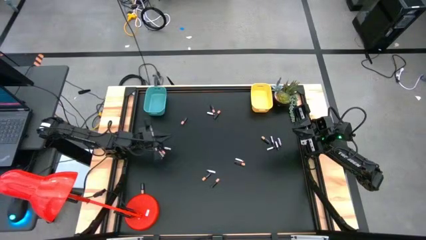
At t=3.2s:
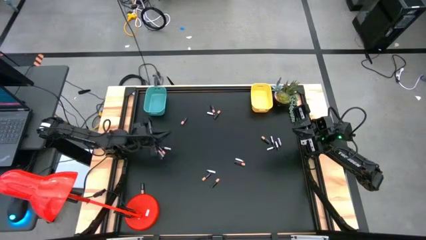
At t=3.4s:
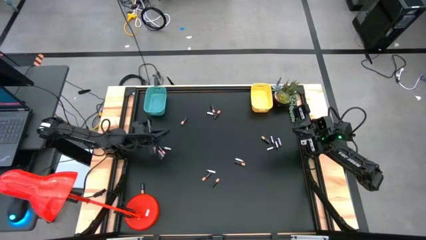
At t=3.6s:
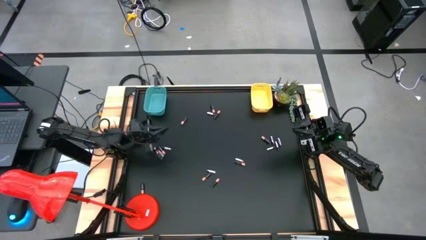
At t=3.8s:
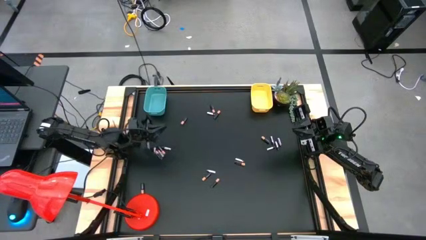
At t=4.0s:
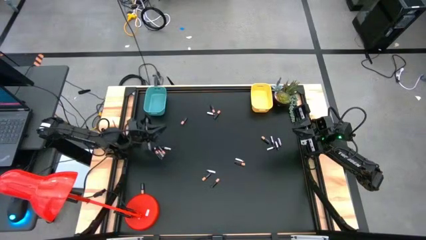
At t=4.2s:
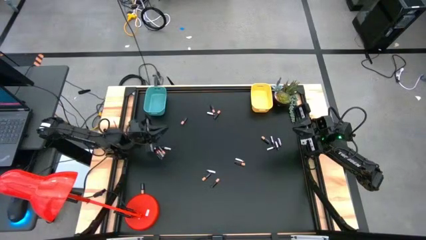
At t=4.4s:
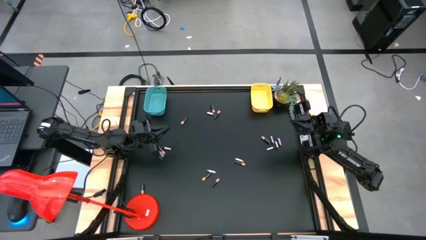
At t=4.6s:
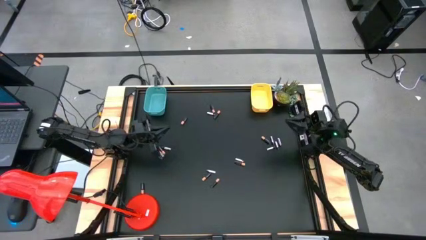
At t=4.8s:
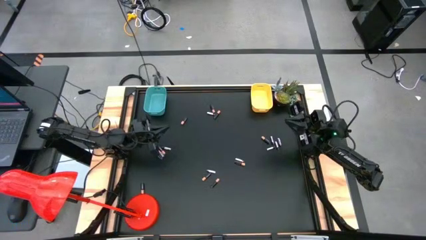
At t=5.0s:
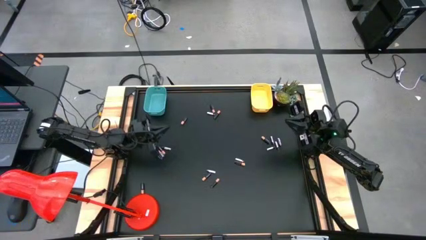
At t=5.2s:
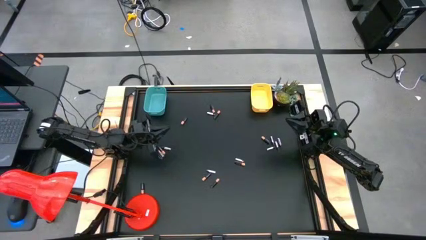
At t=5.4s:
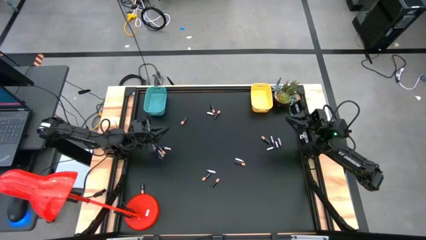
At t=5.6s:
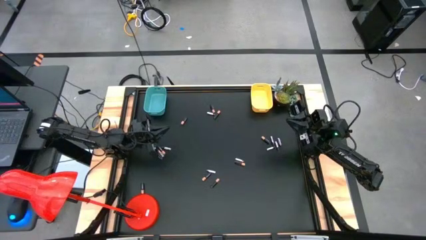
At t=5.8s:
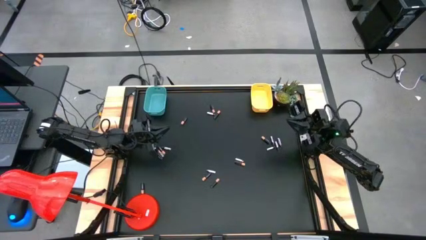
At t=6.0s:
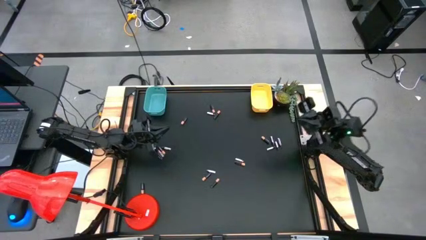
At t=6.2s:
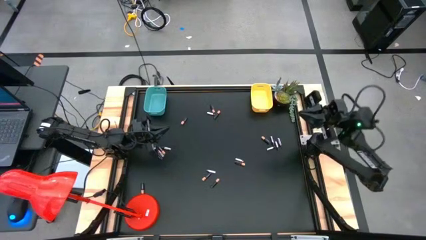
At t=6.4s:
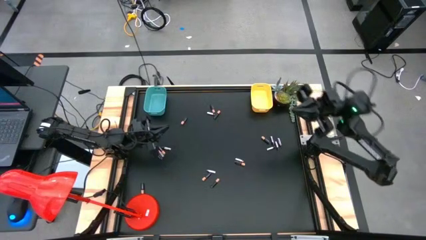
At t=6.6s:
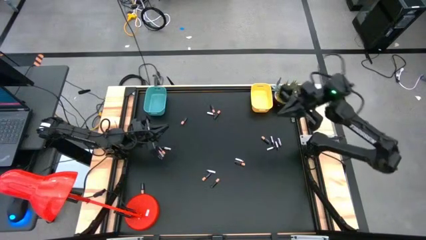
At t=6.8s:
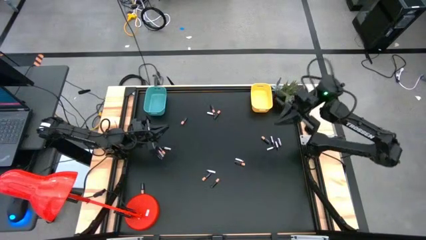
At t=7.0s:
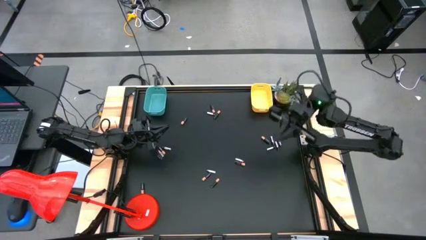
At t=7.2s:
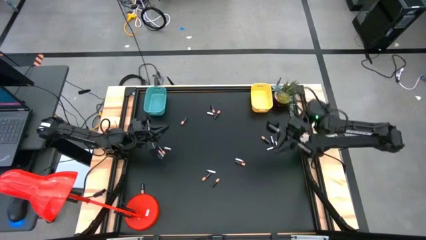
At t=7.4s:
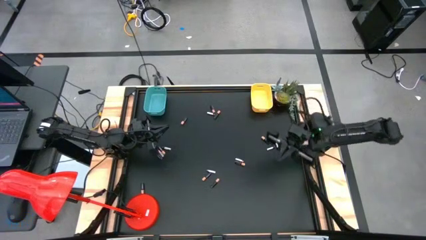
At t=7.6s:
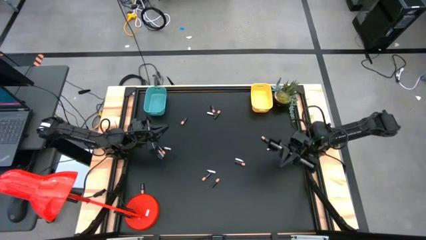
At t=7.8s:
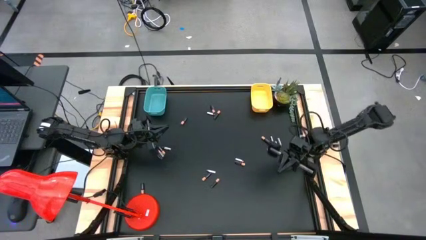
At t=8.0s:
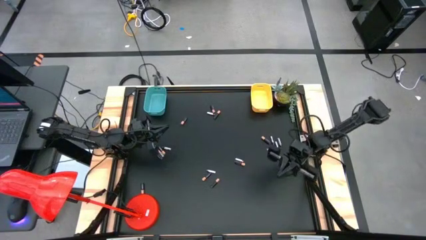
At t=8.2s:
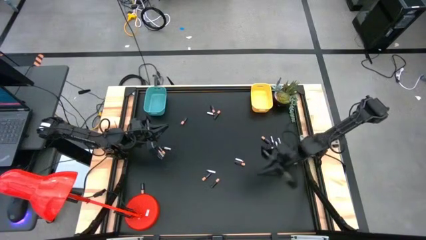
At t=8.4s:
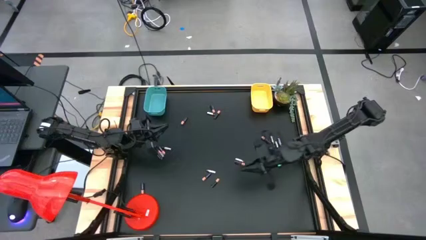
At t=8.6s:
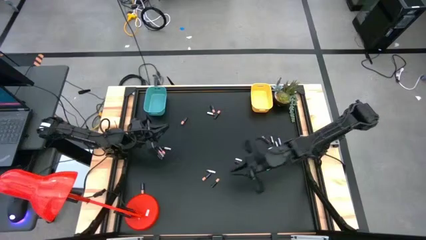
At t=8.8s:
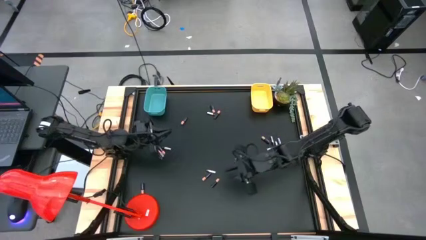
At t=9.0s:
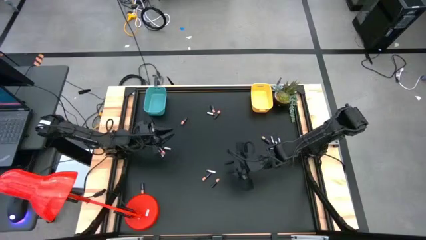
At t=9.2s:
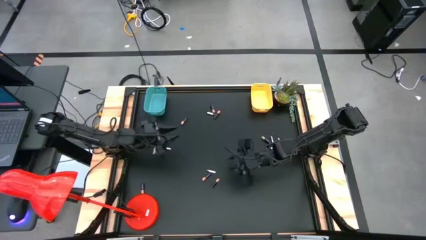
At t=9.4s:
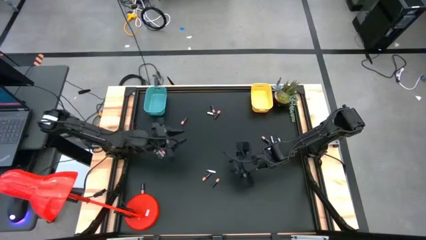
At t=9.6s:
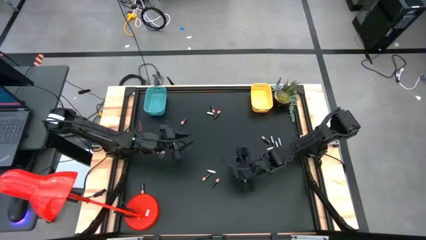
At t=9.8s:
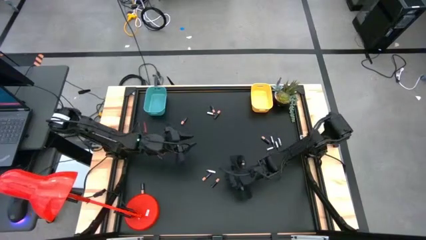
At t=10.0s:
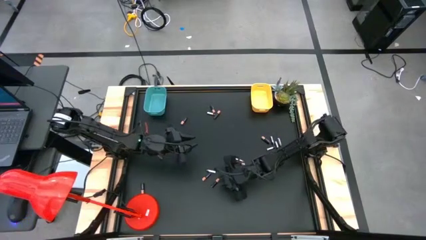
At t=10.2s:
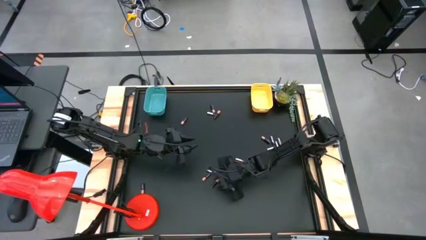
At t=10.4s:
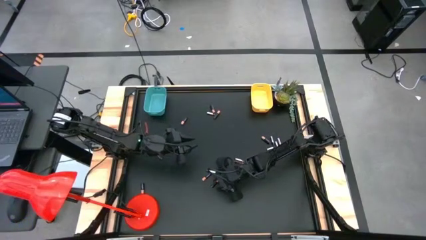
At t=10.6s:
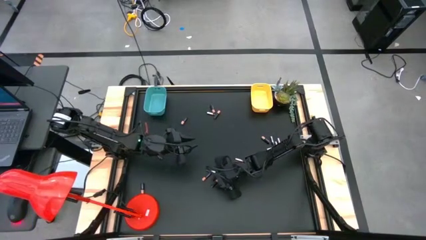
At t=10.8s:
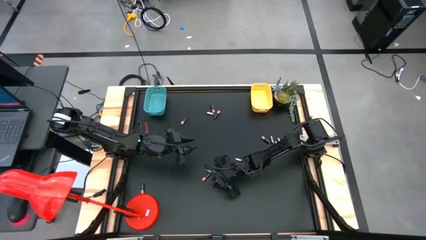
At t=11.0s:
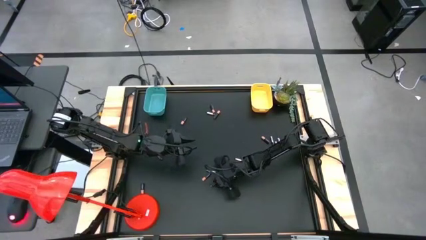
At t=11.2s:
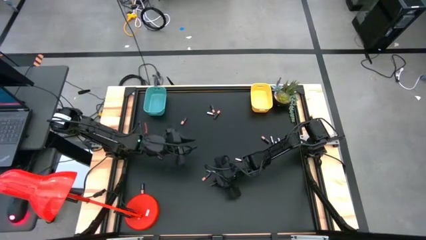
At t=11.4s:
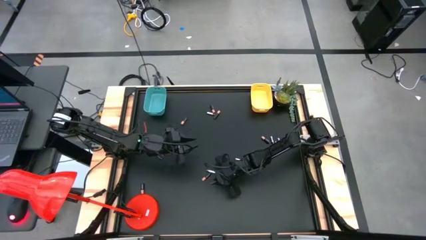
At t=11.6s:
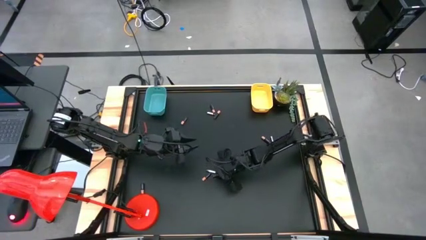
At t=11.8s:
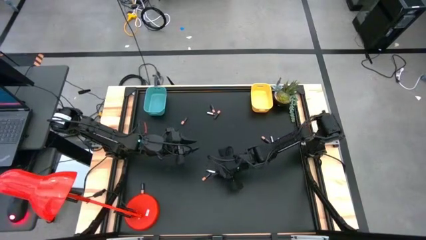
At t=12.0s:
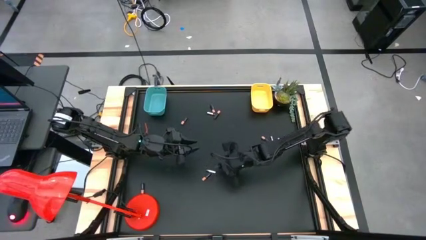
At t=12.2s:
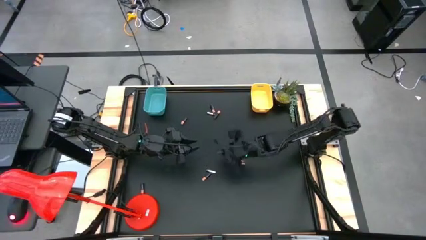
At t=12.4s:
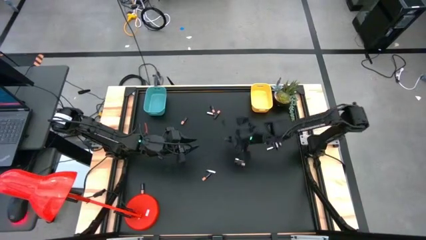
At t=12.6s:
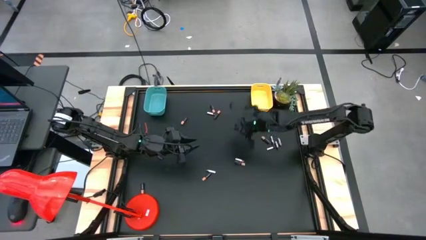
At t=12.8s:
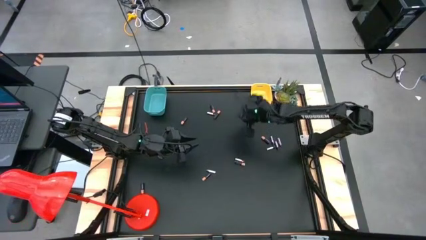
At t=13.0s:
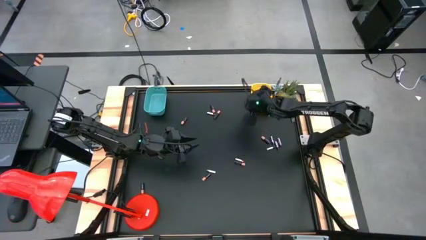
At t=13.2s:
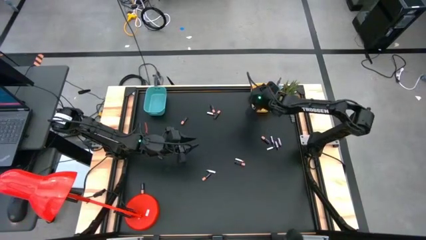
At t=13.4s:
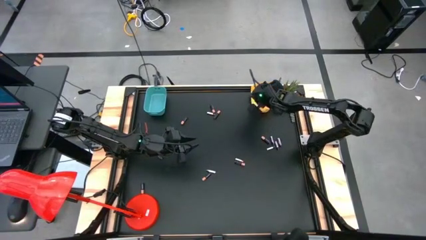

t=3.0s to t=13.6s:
Task: Sort batteries
Put the black battery into the yellow bin
